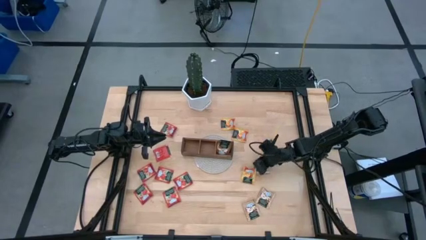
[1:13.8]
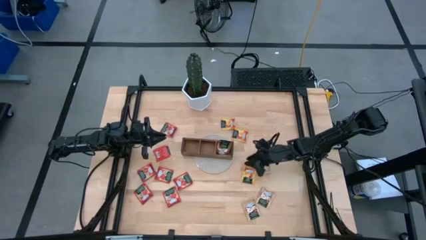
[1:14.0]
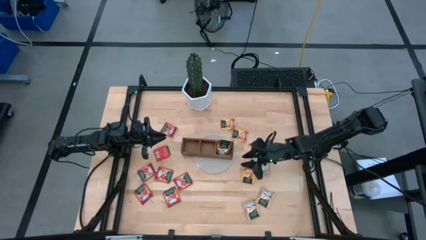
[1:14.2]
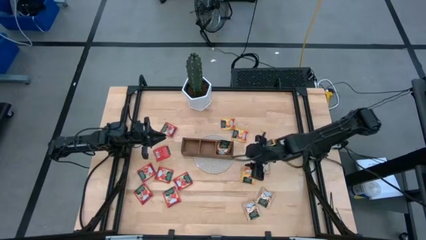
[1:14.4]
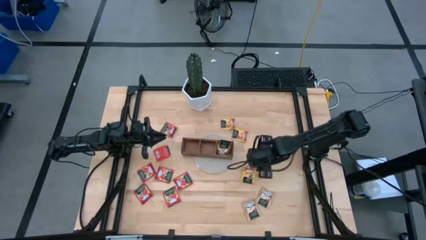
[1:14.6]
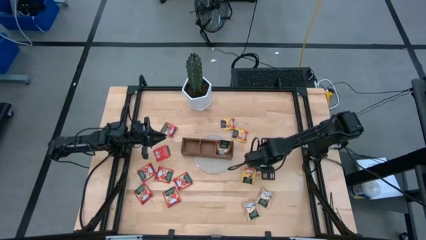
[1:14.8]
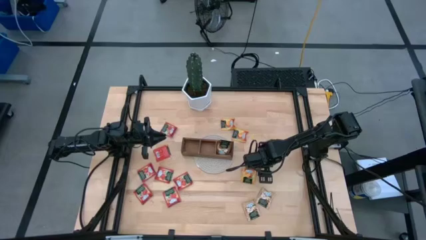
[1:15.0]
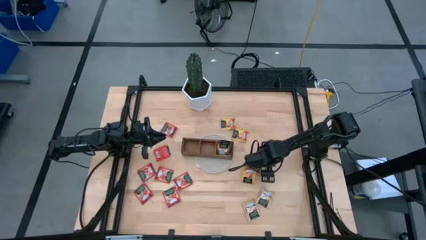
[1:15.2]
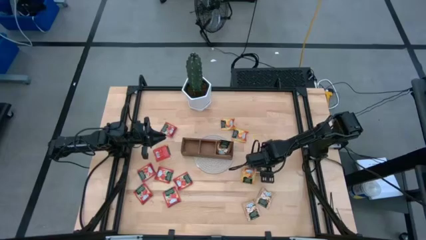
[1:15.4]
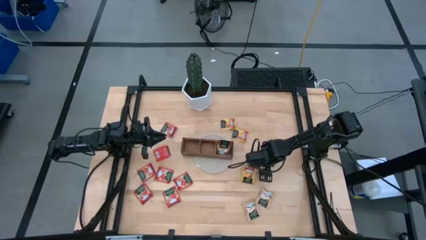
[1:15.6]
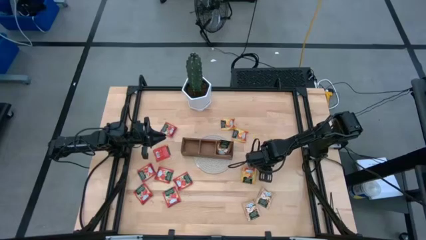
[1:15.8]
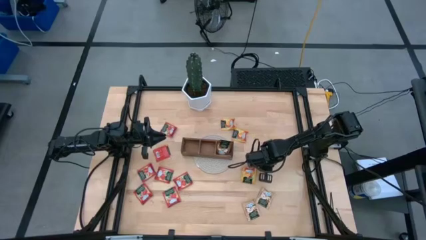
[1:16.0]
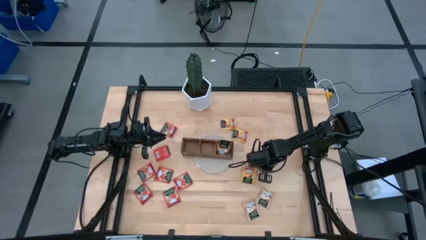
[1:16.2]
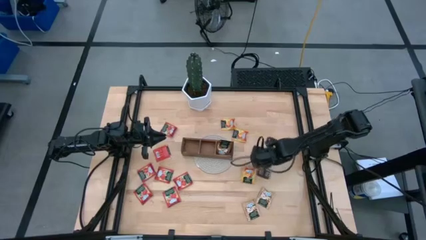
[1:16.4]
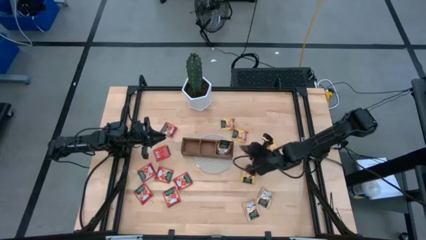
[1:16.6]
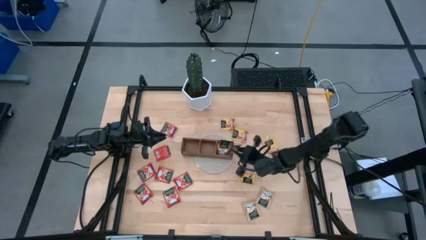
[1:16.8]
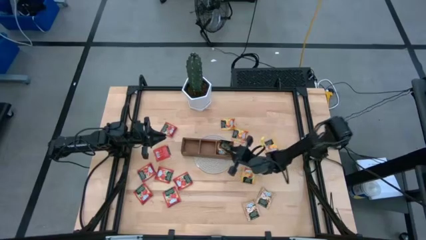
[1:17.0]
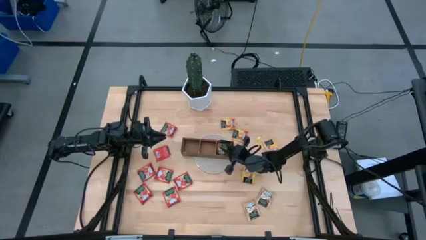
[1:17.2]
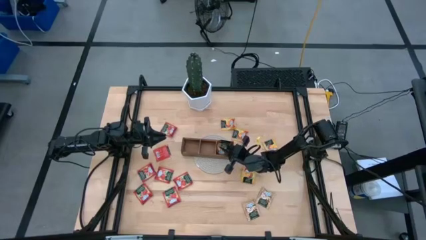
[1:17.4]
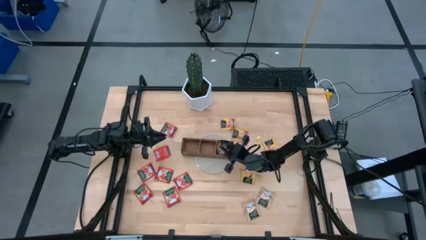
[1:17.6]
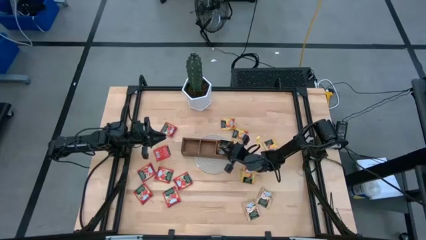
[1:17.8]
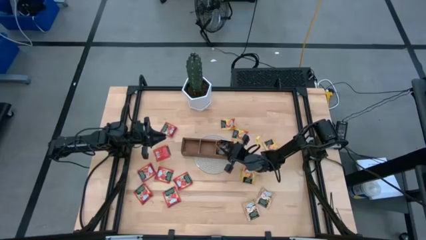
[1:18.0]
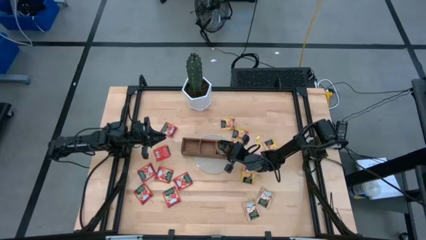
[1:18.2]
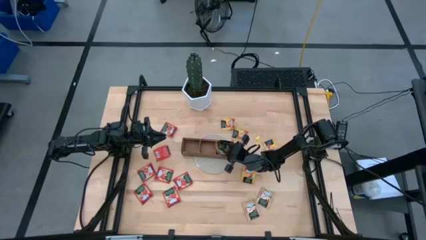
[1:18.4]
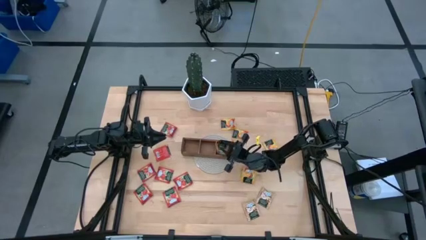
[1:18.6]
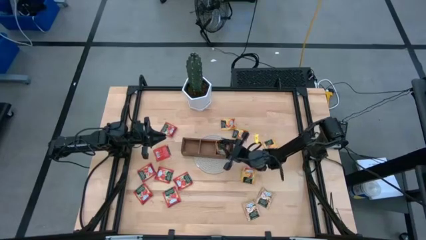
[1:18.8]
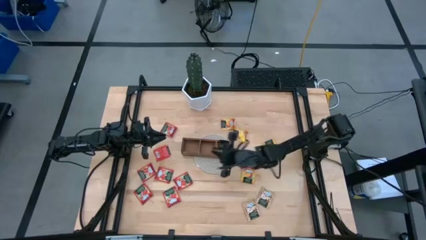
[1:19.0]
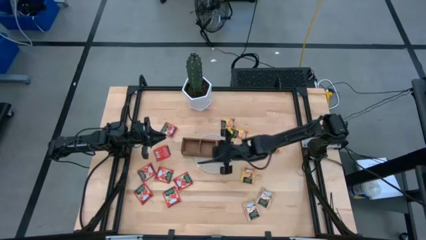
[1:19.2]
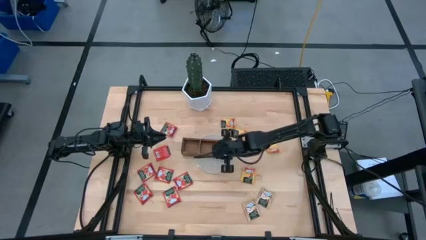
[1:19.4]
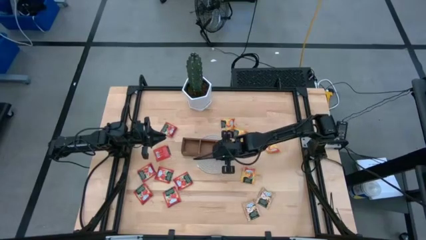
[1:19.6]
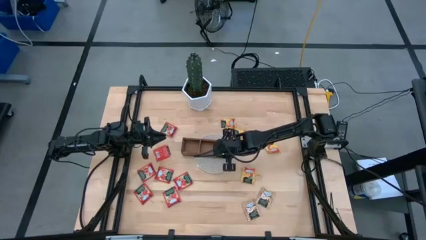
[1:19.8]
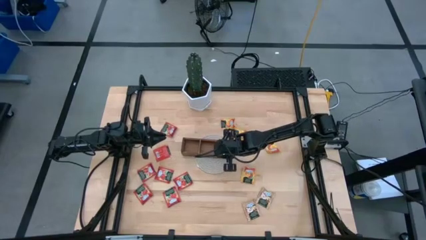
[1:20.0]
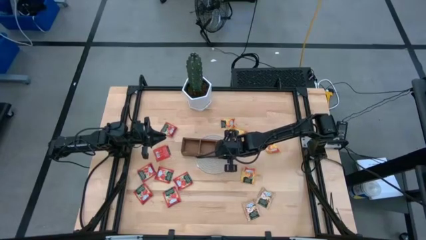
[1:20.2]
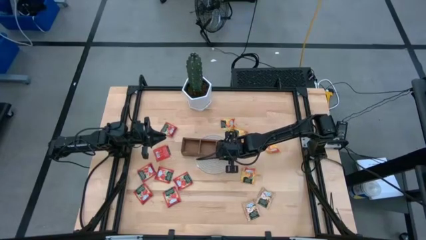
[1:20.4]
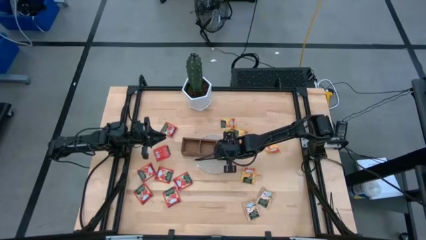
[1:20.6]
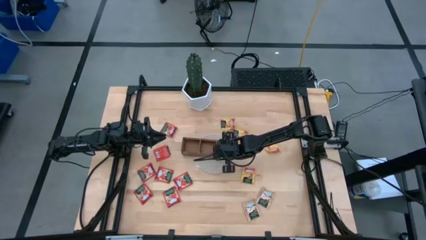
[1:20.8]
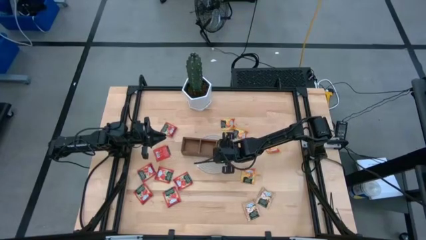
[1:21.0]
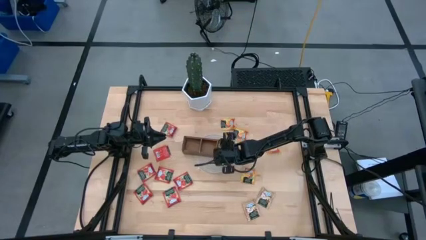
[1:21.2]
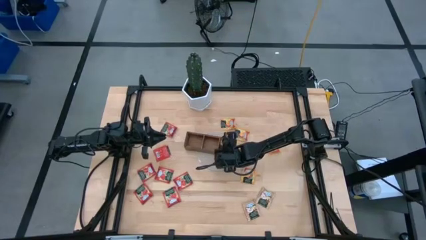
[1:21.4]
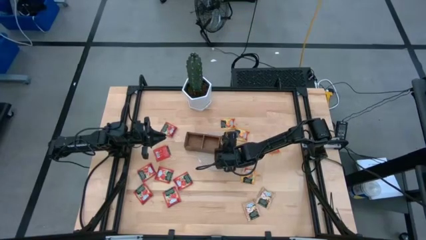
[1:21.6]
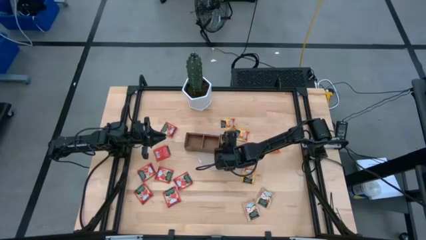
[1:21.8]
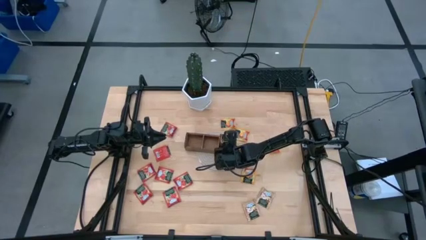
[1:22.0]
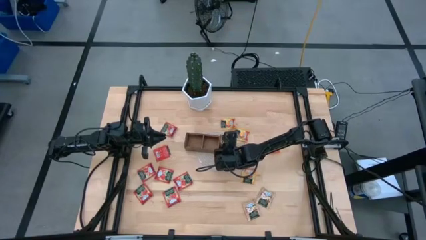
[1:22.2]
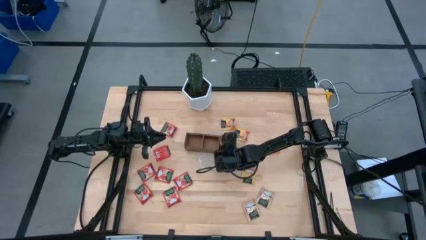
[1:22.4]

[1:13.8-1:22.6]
Task: Pick & Place Tea
Put the brown tea bag into the right section of the wooden organizer

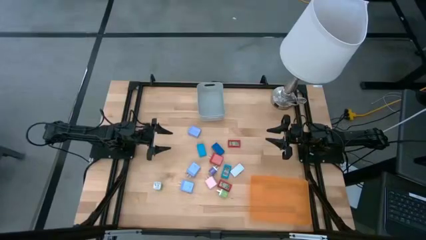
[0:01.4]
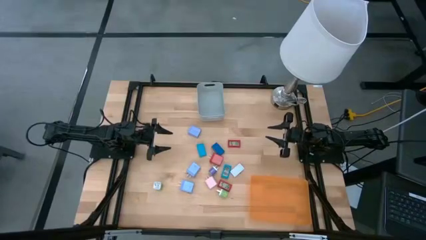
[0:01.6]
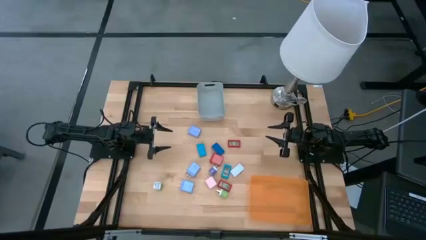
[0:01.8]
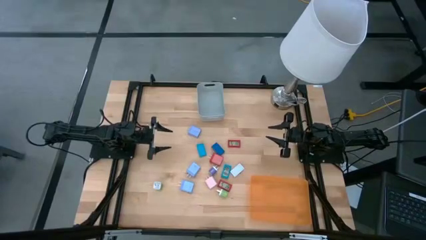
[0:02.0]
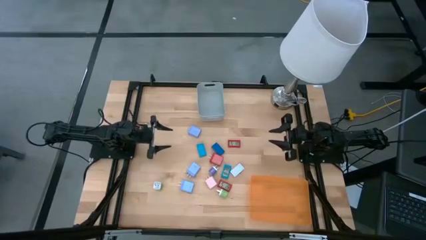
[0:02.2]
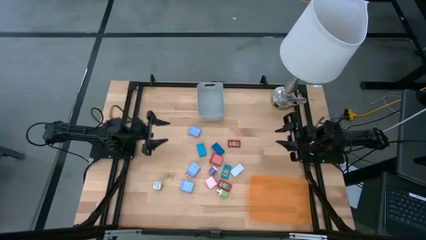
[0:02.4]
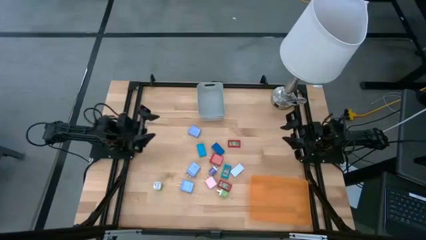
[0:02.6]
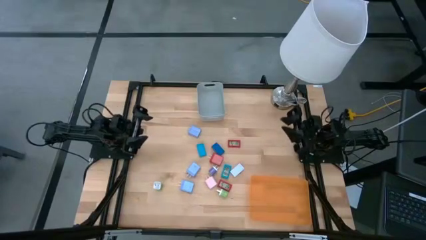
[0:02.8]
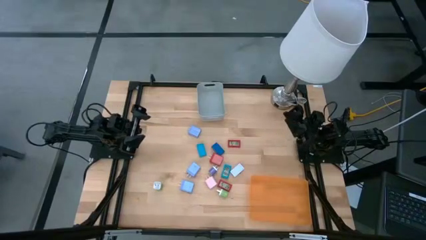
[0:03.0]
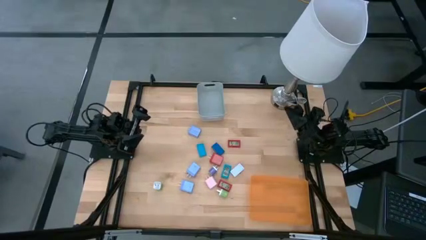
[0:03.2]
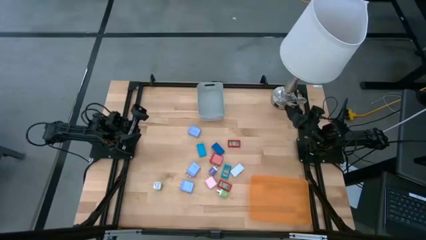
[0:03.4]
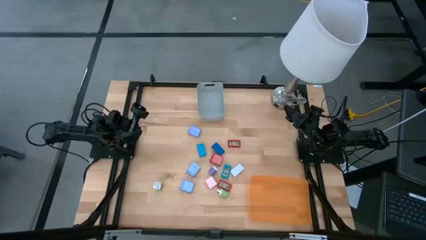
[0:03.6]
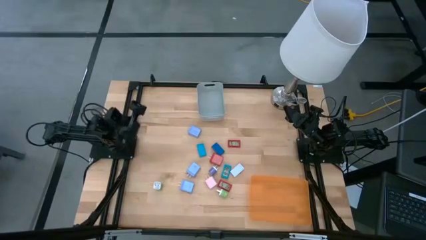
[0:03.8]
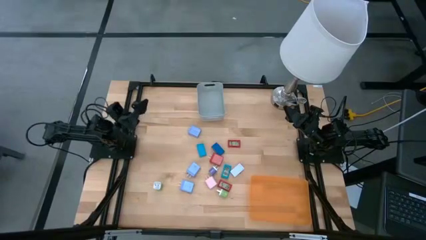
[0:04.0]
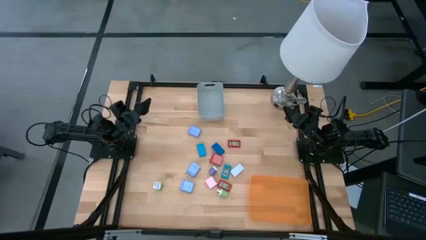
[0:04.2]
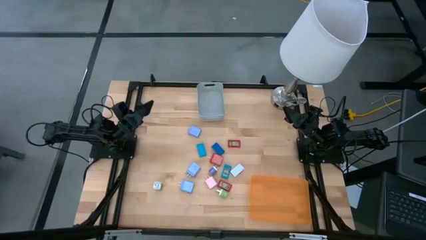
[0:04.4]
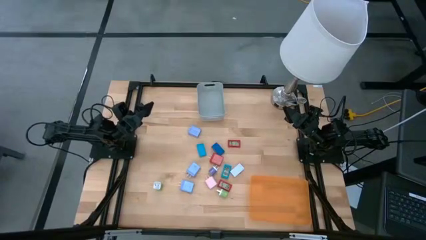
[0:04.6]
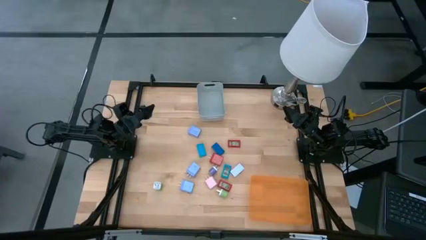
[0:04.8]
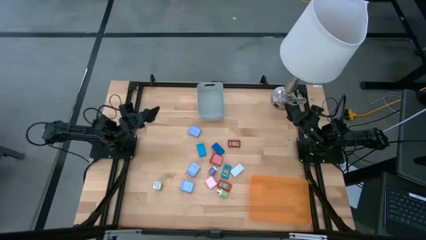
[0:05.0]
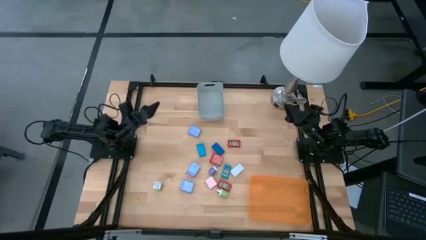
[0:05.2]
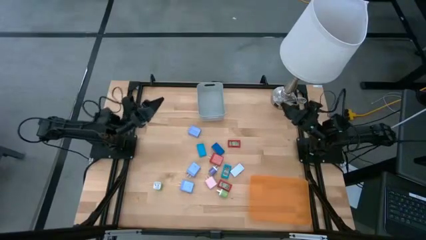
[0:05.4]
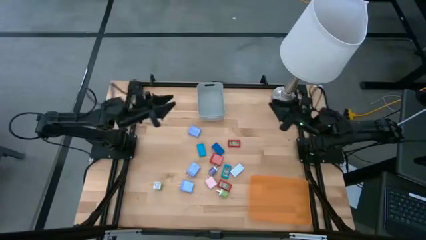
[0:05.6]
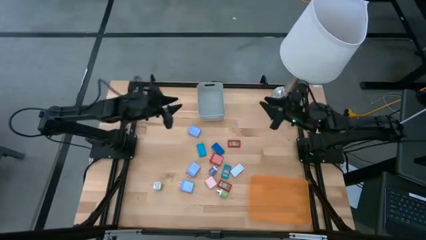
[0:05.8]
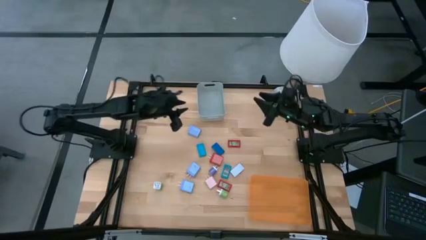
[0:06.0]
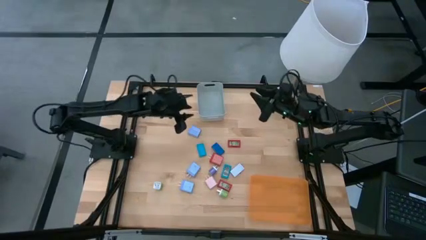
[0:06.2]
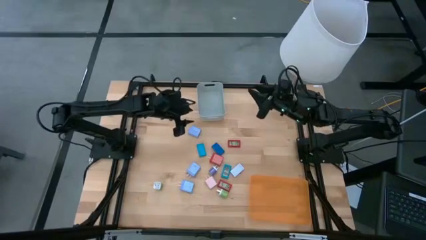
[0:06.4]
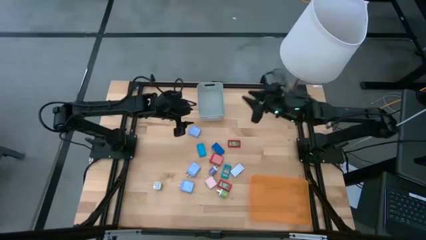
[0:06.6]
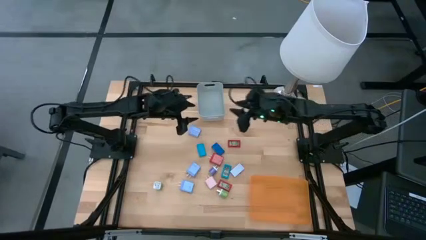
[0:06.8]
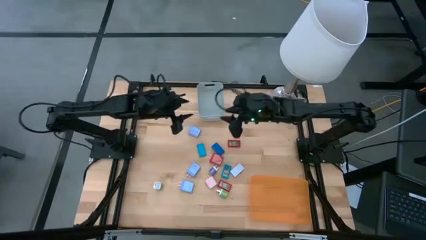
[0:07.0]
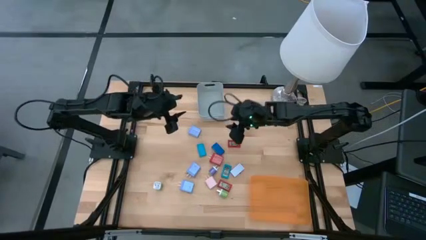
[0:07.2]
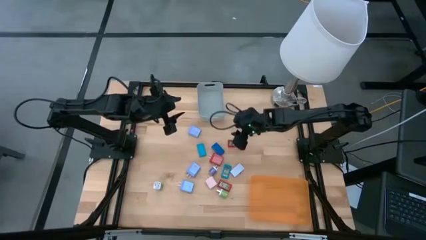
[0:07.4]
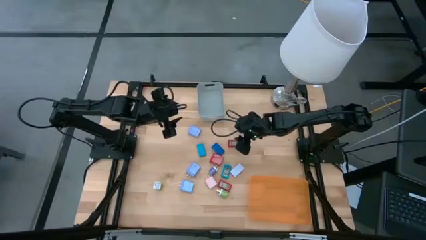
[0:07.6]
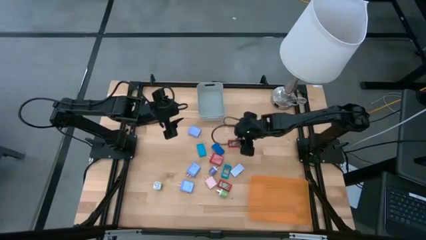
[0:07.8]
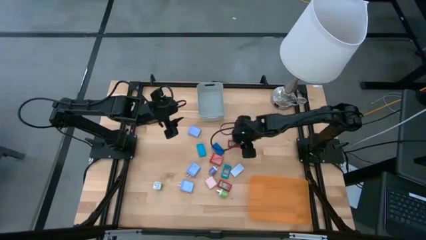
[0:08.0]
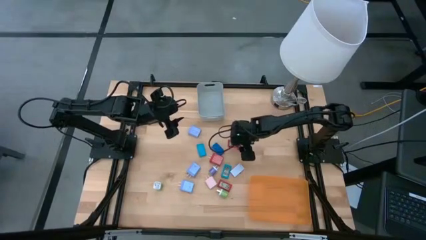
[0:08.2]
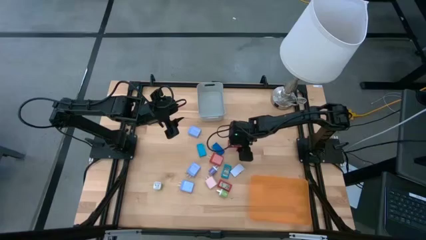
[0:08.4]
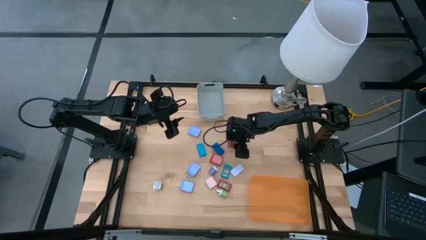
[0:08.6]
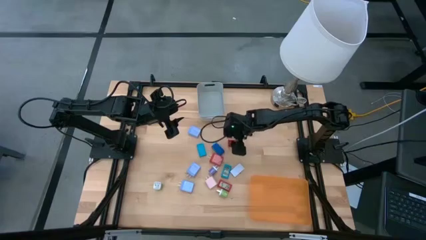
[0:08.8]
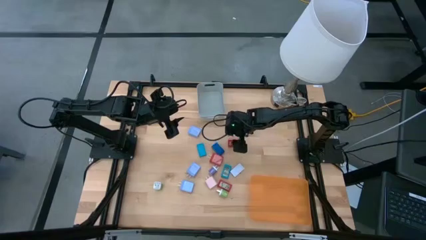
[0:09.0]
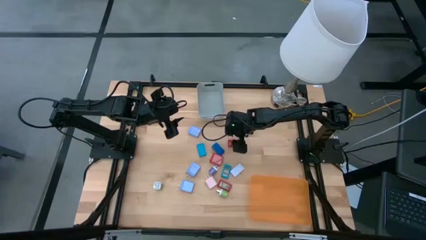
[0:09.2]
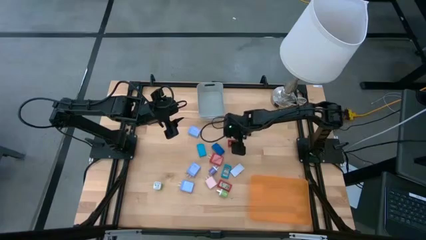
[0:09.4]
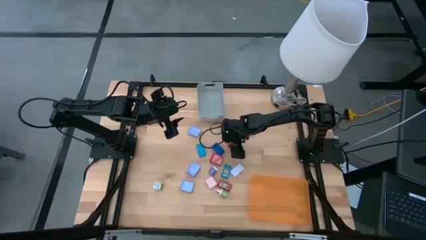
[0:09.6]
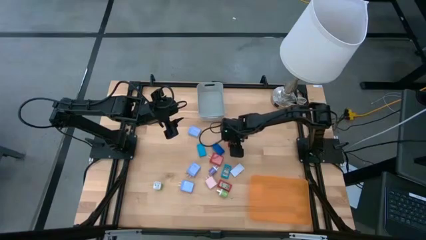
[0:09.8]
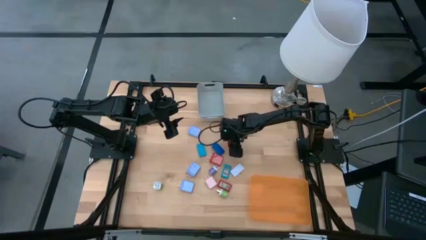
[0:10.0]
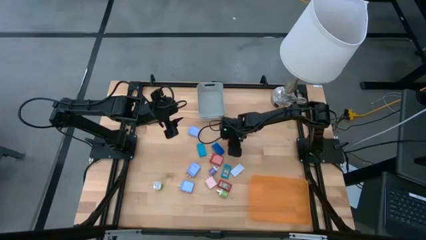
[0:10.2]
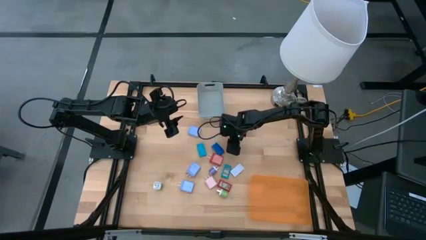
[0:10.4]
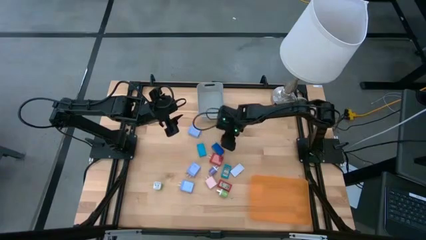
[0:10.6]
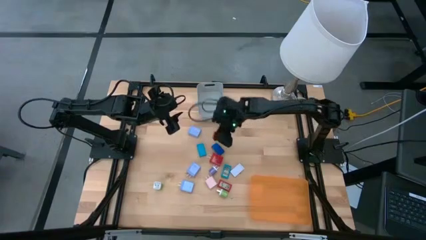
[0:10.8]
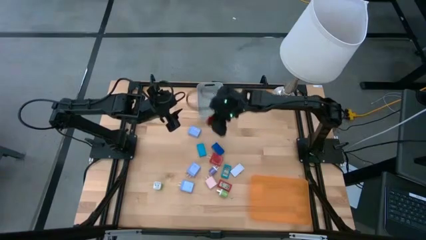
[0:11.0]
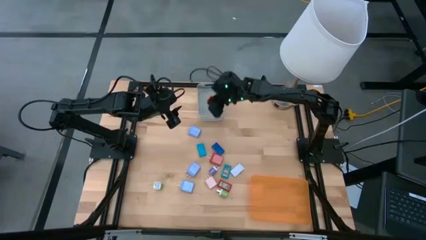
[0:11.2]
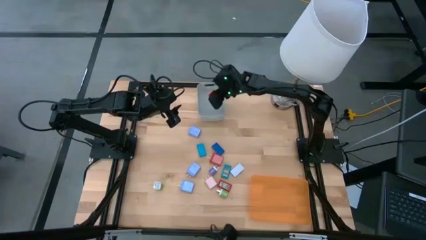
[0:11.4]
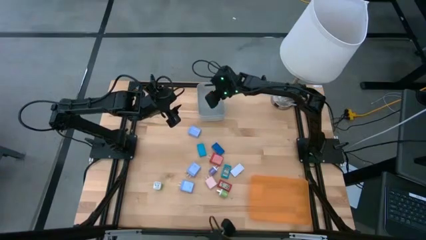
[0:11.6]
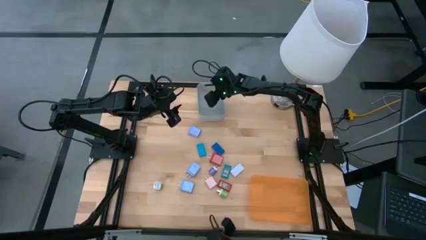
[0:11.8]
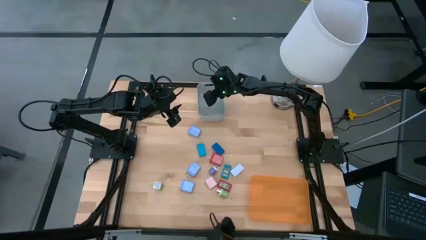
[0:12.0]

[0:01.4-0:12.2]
Task: Pick & Place Office items
Put the top red digital timer into the gray bin
